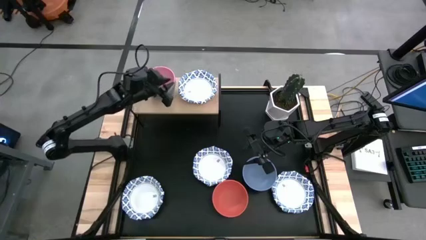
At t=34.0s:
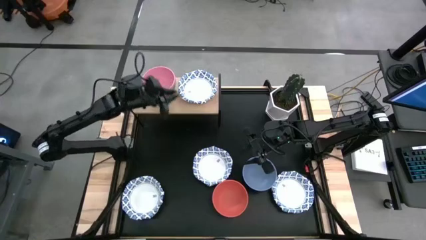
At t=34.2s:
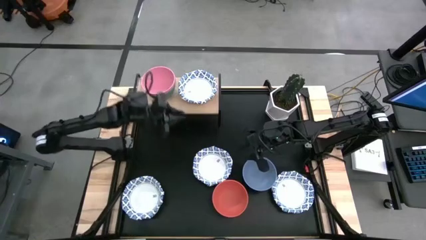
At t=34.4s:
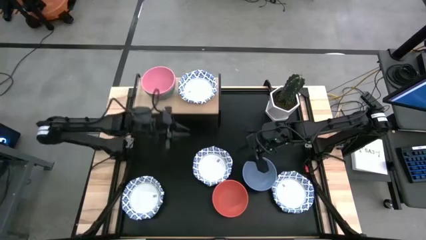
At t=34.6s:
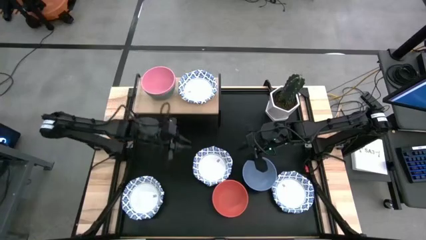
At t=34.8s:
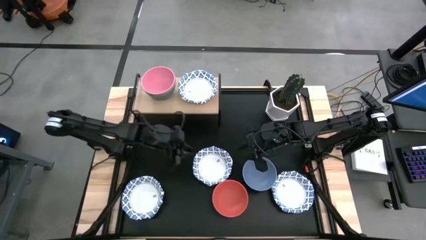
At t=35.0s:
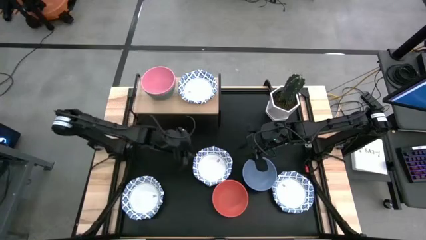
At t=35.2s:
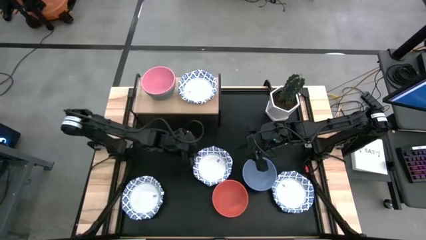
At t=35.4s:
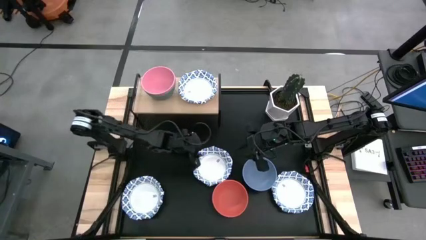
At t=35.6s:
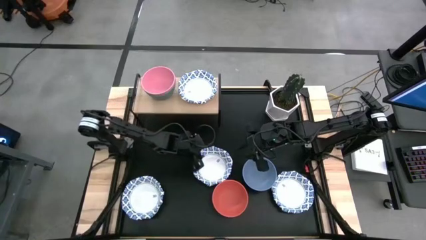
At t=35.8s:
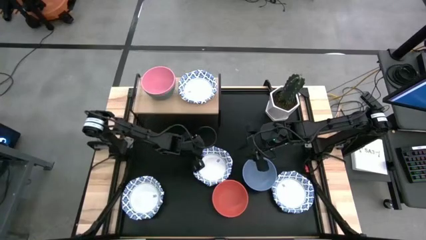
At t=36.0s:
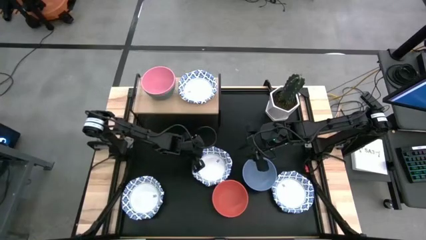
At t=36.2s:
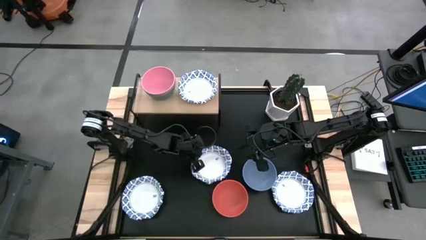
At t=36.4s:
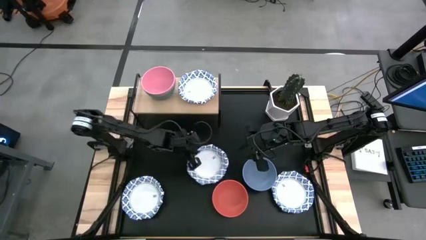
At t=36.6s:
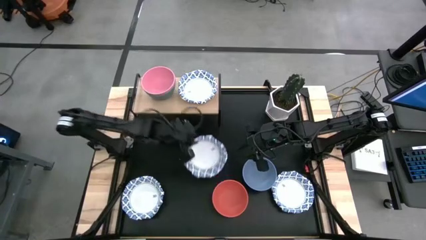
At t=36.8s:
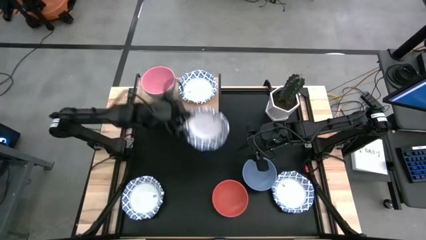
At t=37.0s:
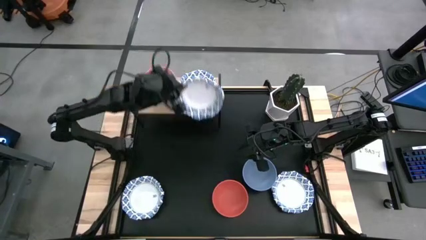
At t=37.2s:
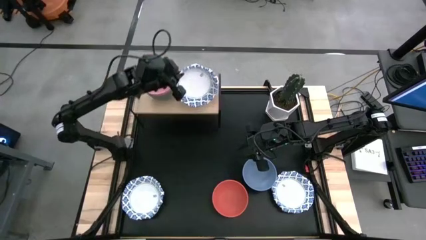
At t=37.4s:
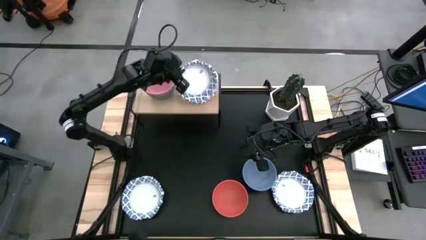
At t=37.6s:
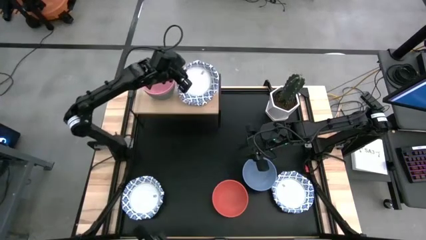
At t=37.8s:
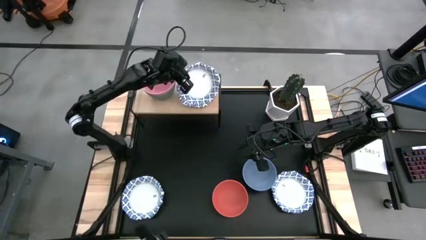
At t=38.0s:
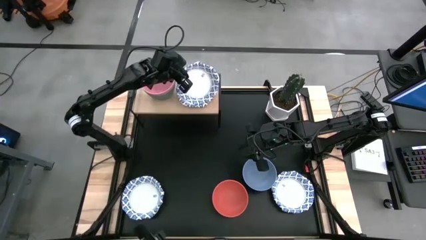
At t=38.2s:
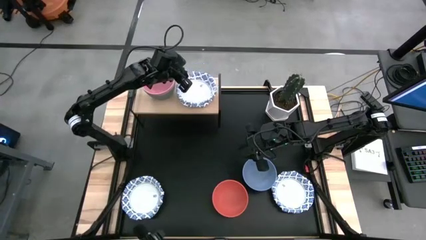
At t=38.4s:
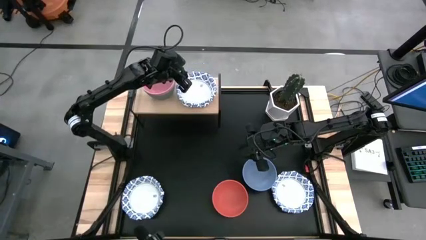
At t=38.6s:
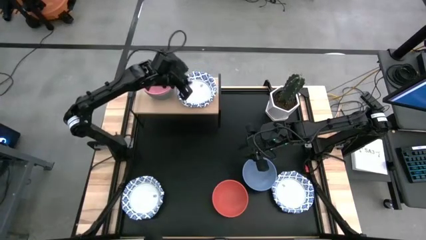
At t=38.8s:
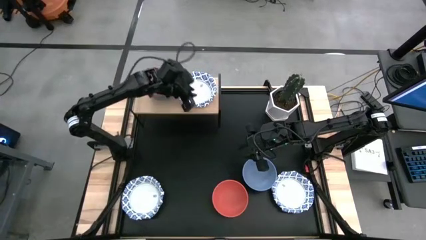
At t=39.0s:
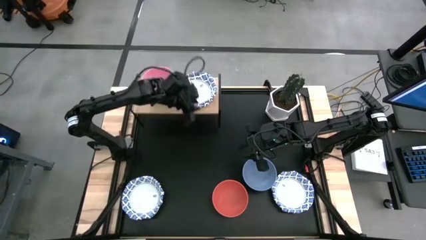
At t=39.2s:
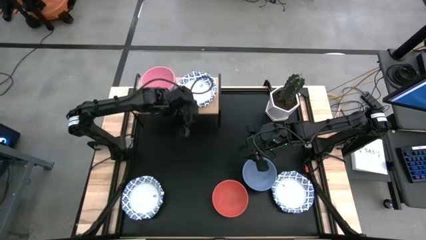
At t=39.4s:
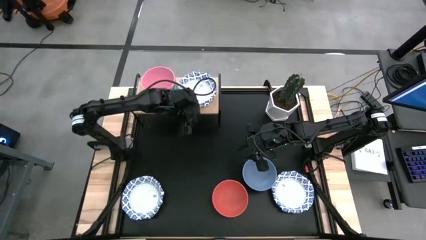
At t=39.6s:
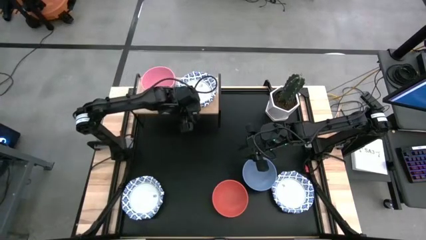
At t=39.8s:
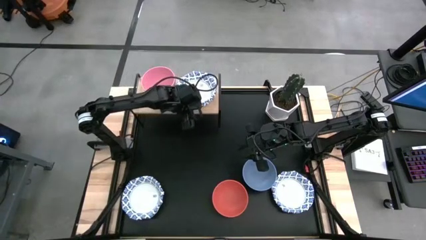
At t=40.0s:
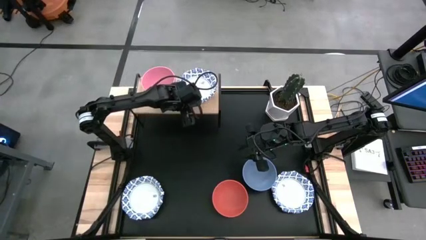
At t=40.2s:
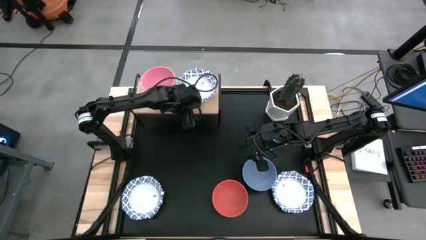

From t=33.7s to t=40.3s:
Task: Place and stack bowls onto a shelf
Stack the white patterned plate on top of the white patterned plate on the shelf

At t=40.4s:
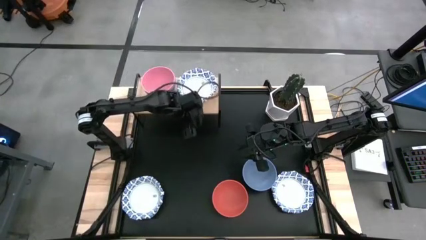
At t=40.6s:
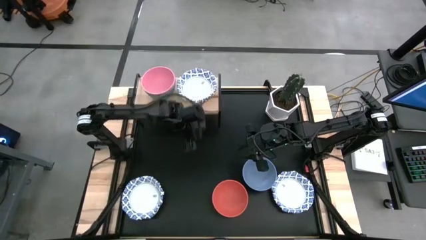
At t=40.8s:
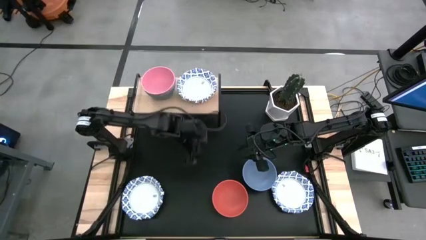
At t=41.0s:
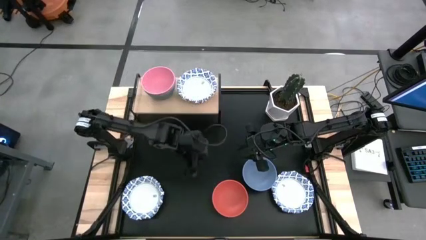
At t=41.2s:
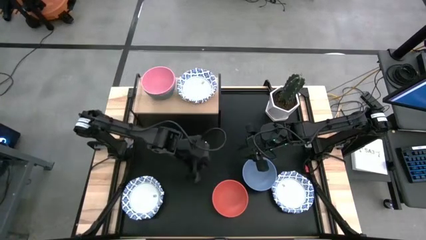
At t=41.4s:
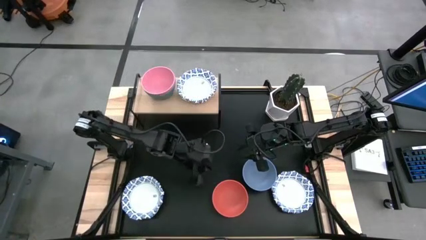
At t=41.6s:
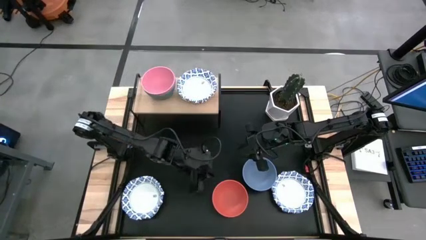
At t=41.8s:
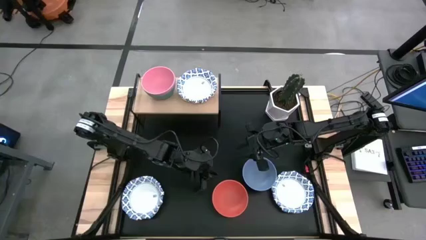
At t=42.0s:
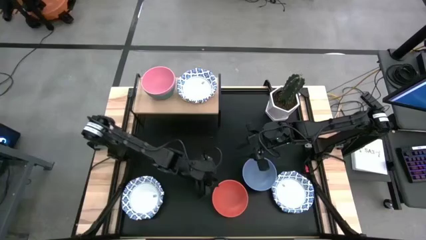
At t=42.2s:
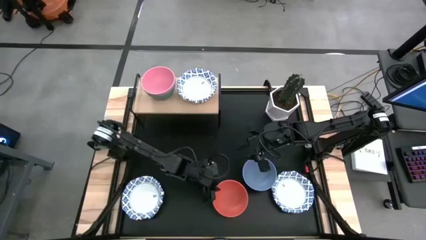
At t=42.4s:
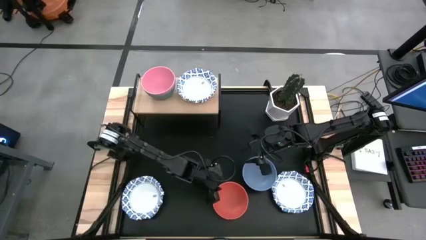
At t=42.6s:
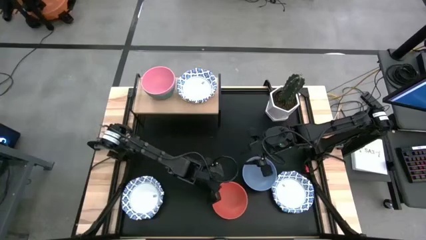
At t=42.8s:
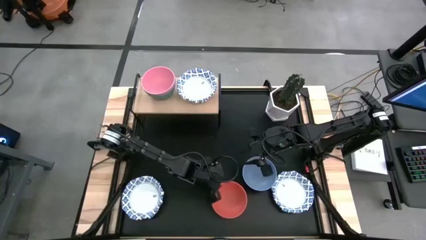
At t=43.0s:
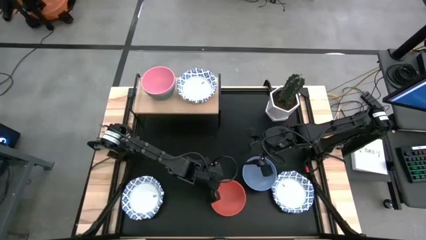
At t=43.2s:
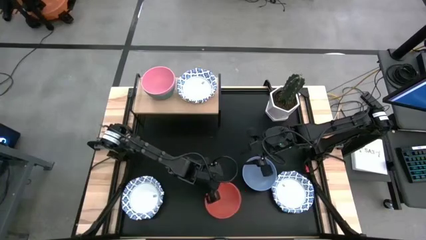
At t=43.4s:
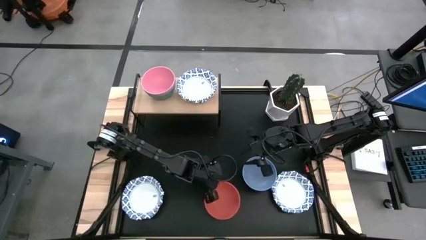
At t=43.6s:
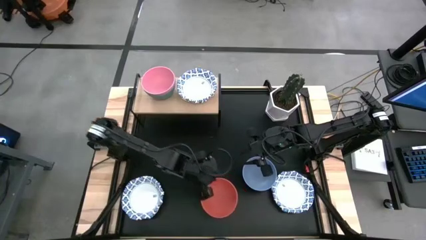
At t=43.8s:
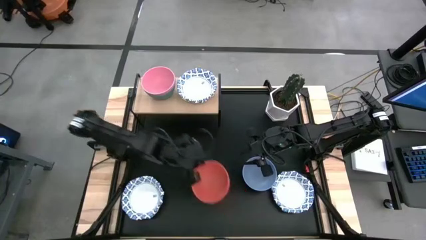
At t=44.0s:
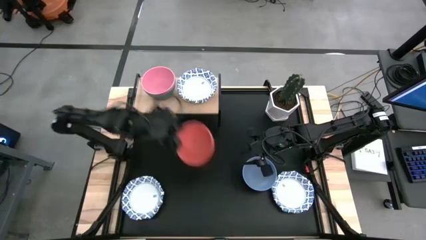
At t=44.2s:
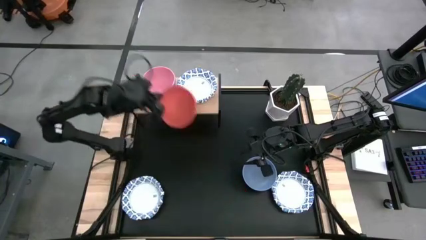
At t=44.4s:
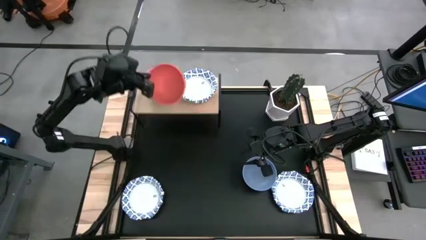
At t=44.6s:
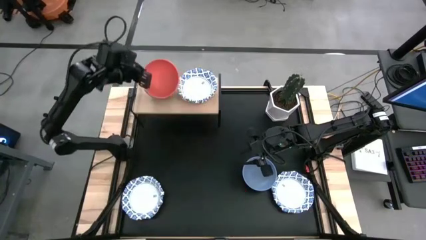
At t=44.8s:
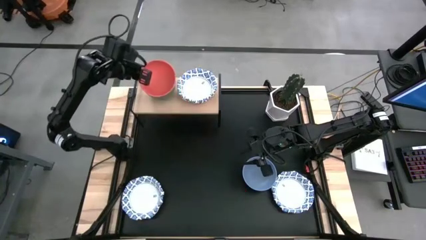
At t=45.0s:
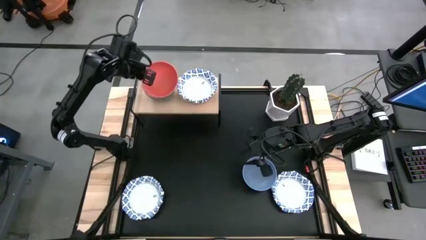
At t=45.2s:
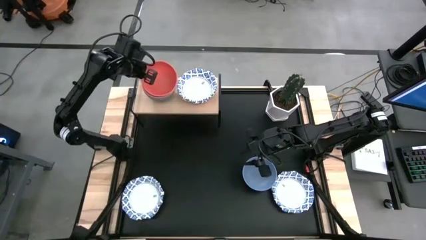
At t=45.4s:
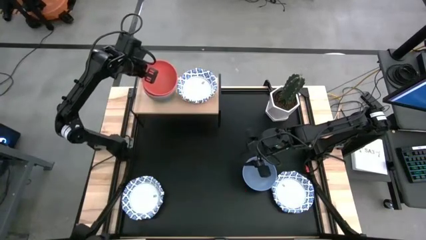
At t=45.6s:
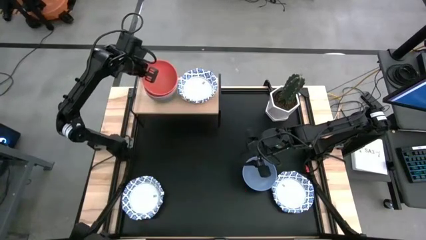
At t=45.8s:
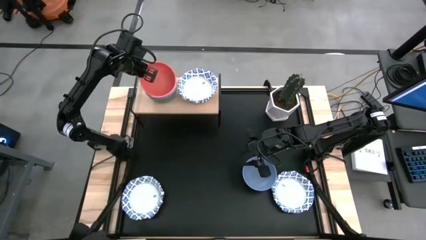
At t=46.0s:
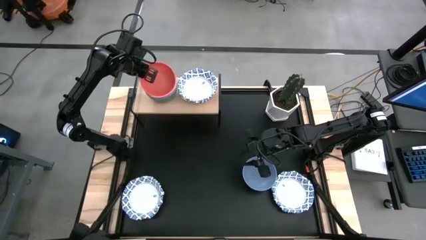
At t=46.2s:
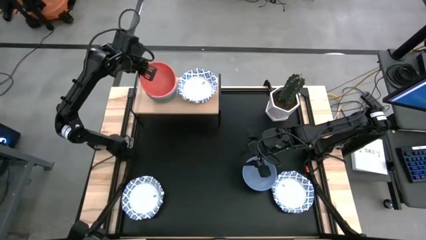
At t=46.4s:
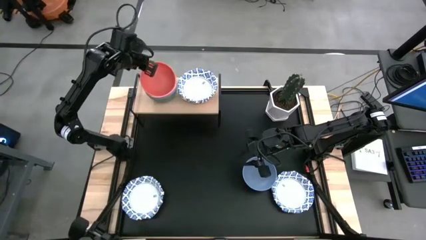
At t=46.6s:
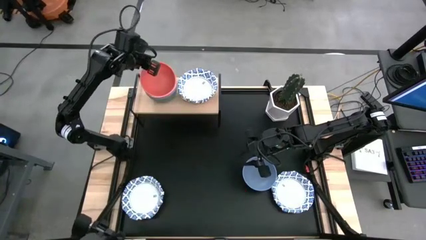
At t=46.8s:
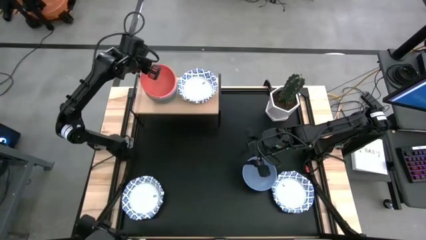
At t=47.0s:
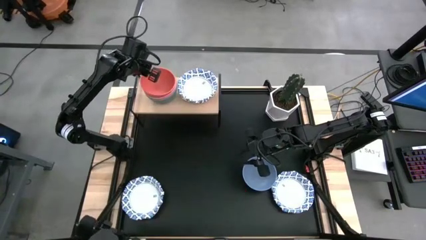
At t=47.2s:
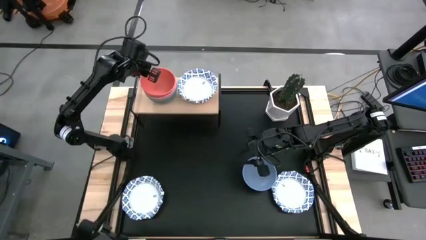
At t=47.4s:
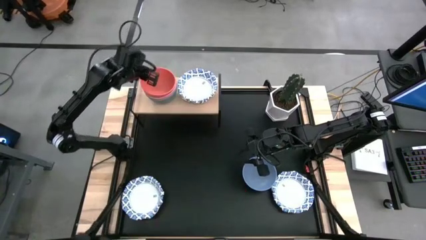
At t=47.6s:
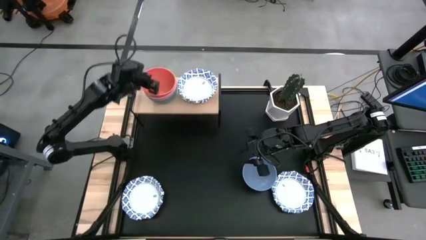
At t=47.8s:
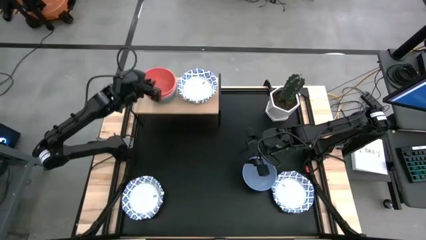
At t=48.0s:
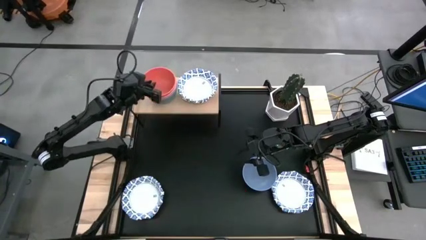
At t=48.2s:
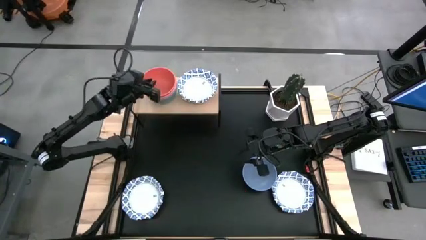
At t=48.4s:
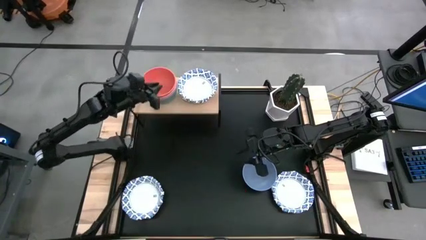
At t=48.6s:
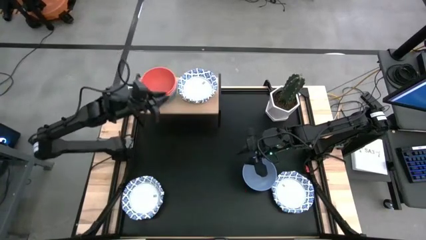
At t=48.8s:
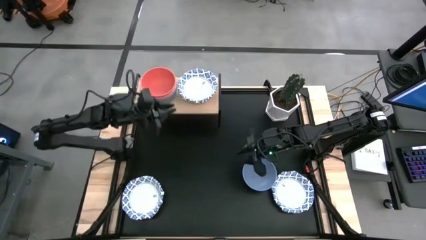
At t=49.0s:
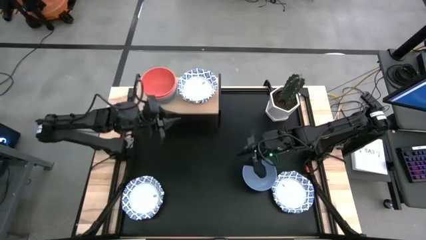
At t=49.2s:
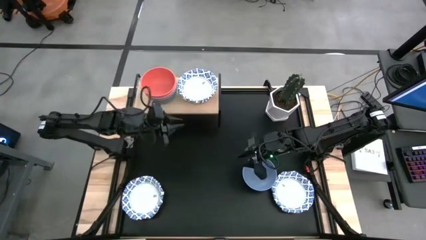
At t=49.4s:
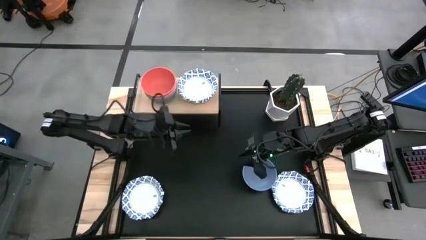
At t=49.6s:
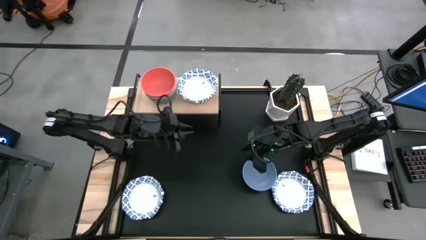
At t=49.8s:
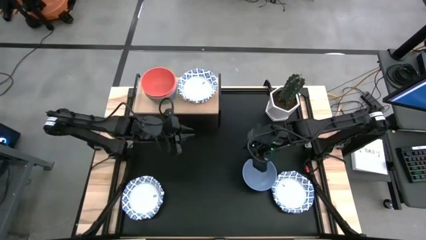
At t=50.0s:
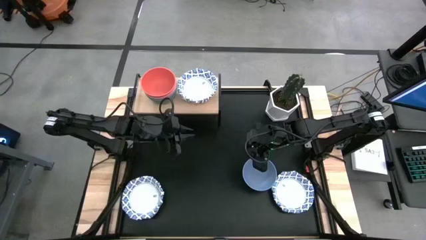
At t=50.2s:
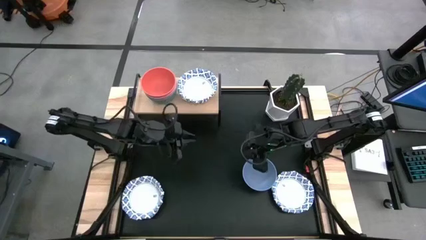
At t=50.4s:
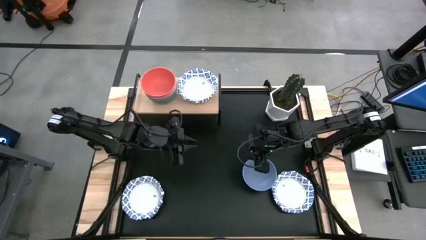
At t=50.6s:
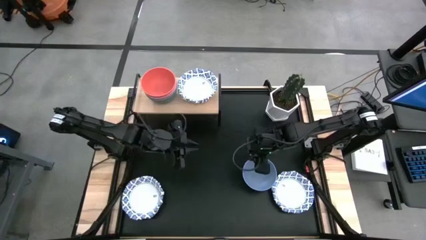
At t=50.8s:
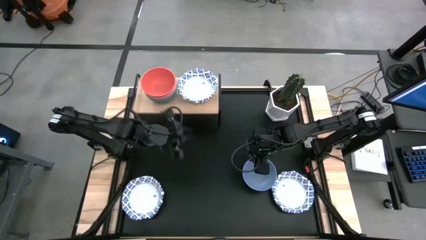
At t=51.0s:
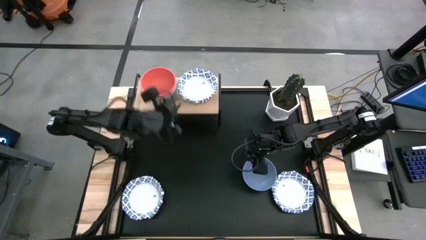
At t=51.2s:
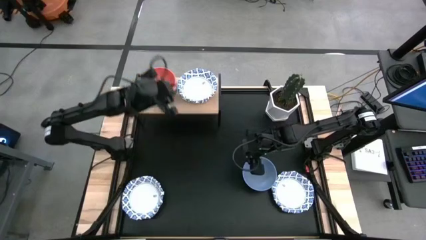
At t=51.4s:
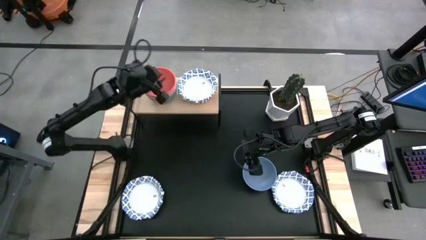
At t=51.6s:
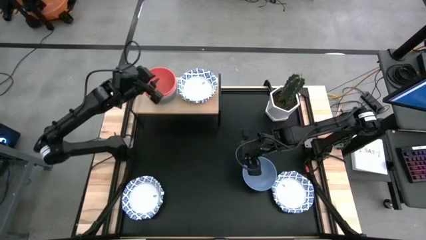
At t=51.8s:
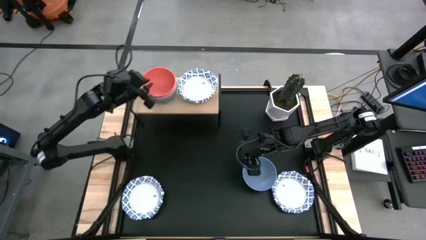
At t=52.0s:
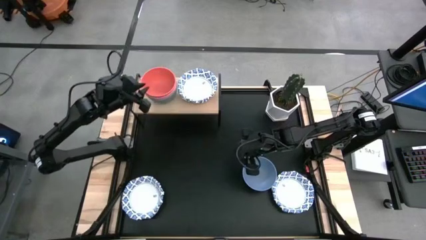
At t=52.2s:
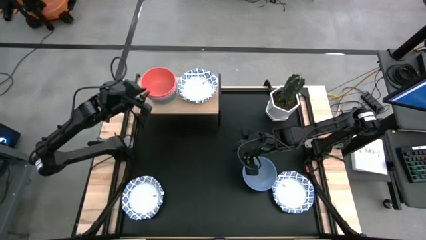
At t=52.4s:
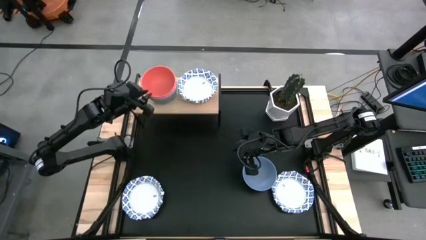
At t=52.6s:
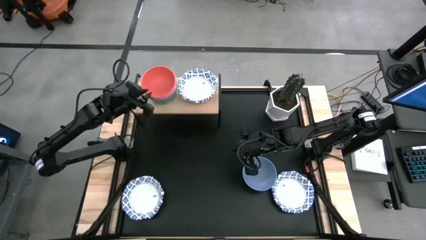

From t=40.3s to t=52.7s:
Stack the orange bowl on top of the pink bowl on the shelf
